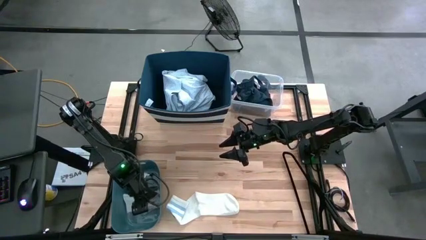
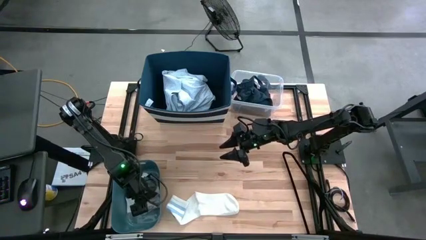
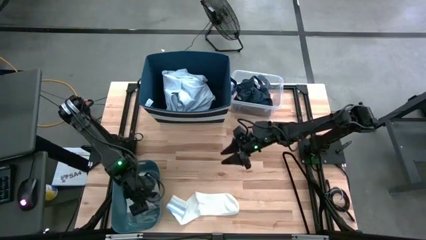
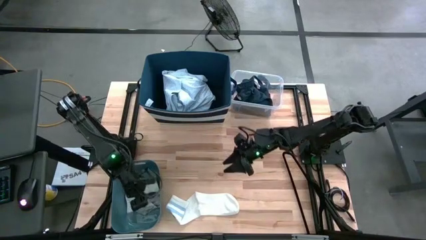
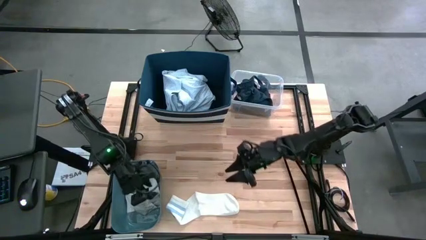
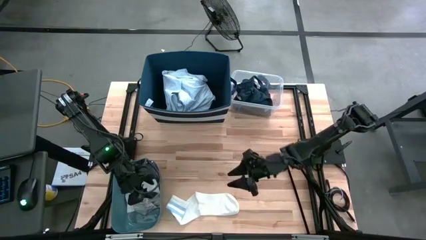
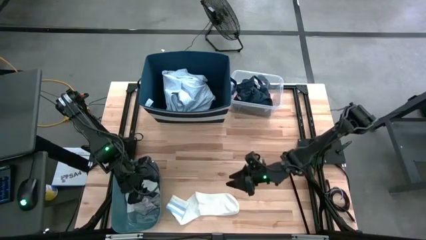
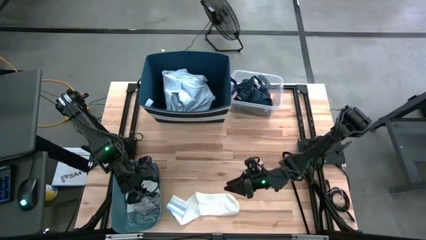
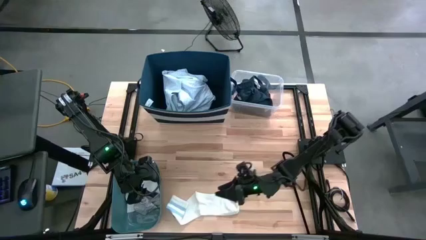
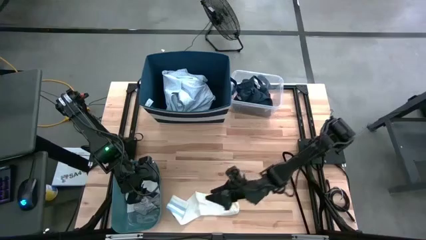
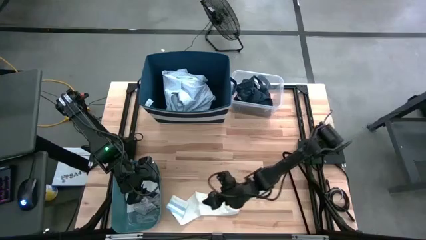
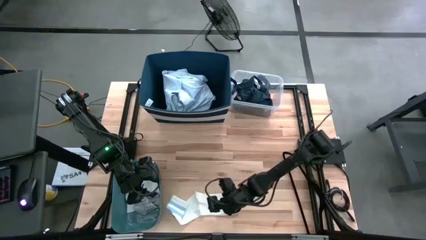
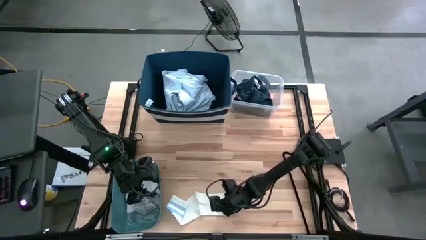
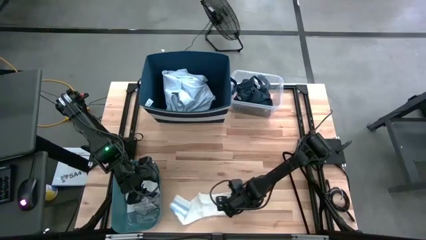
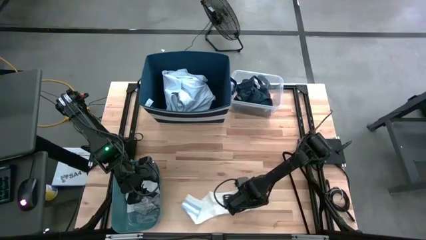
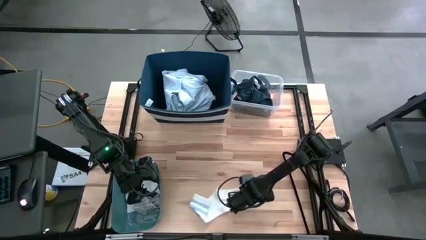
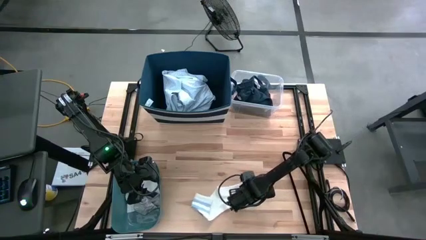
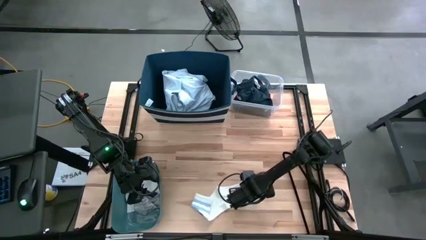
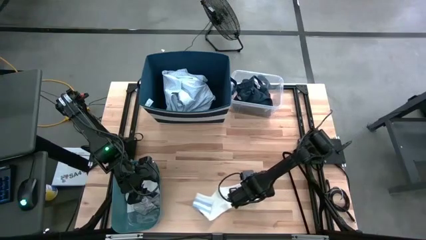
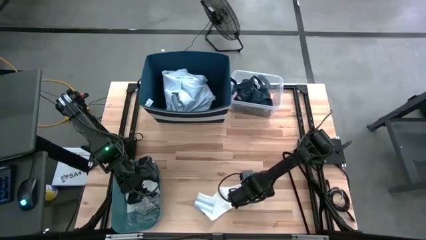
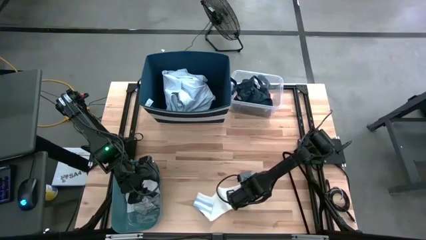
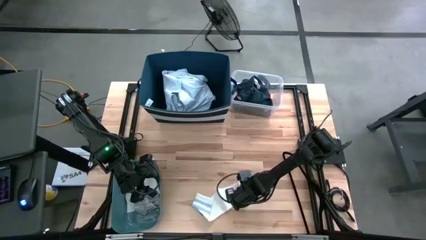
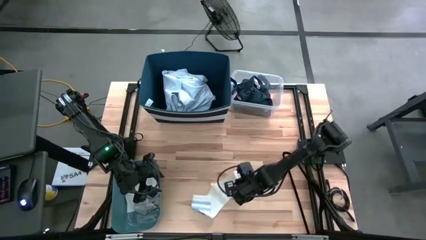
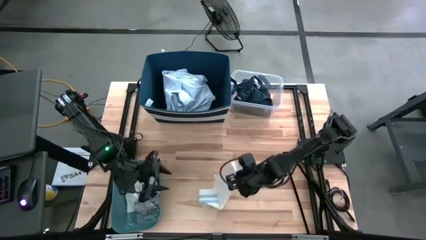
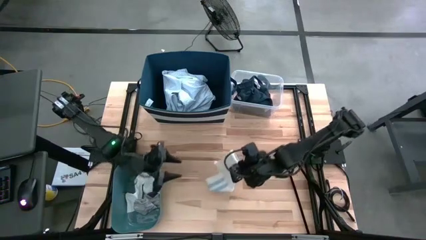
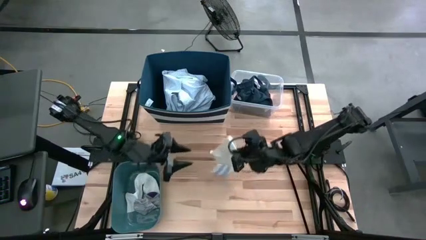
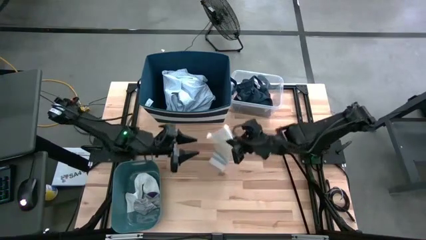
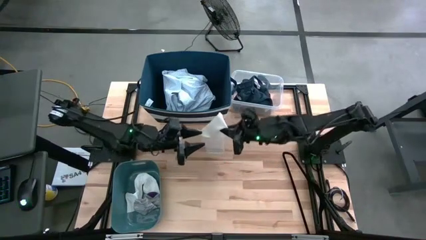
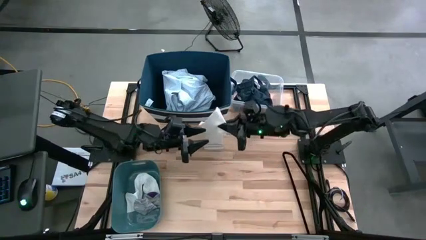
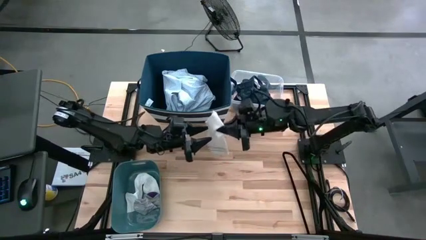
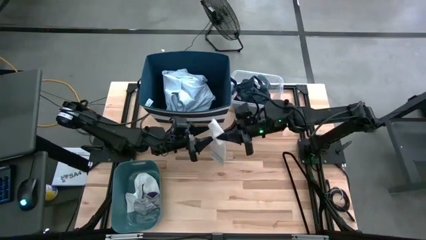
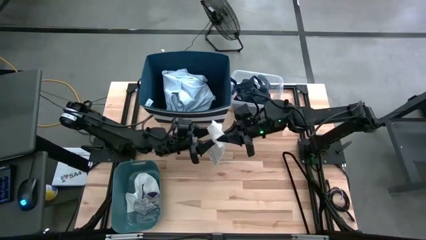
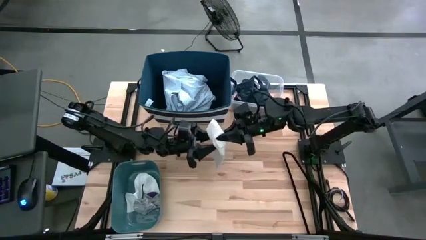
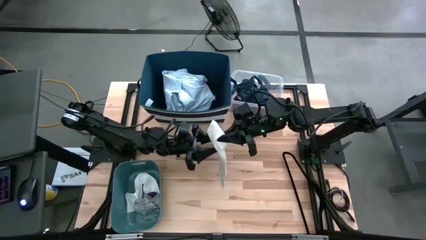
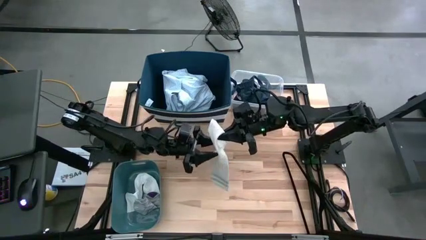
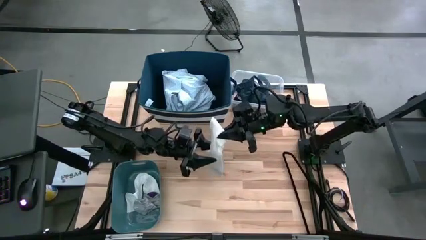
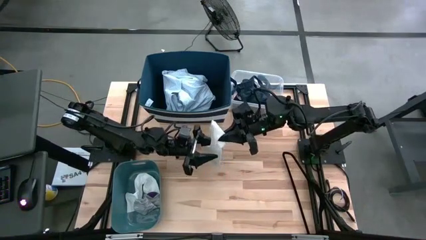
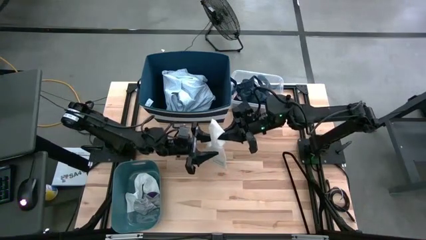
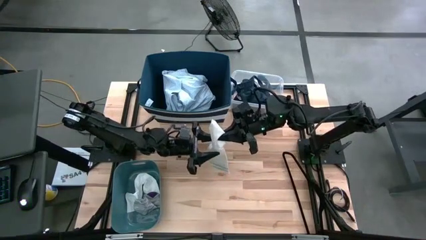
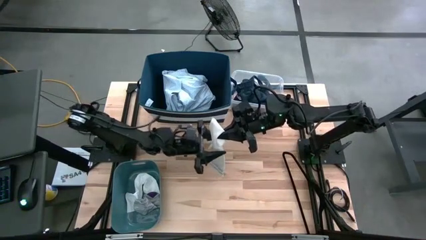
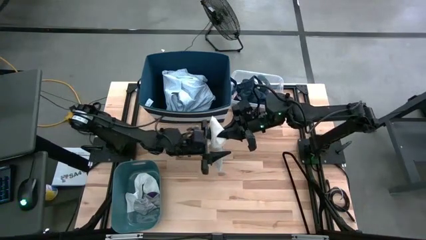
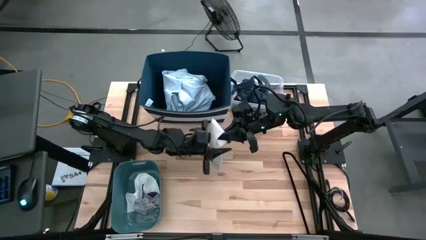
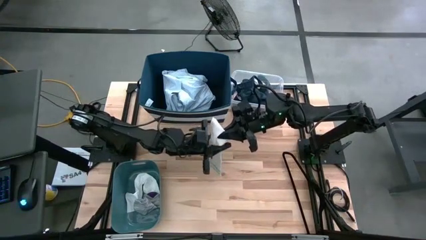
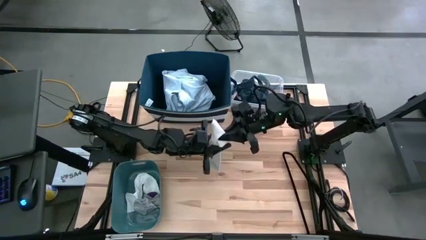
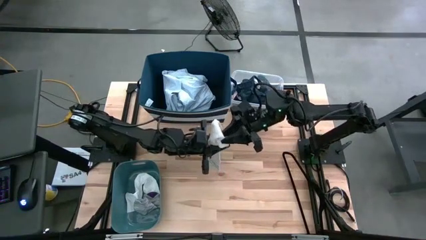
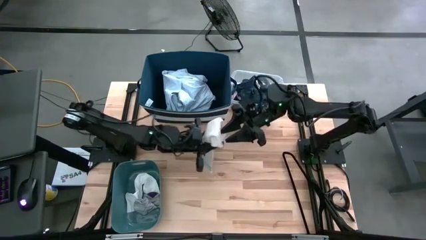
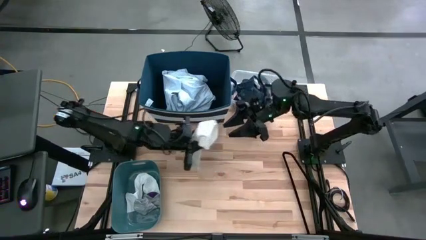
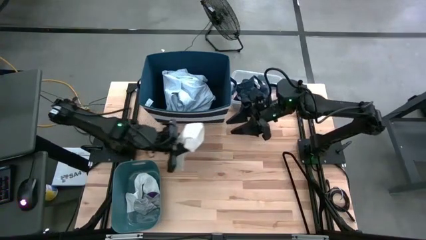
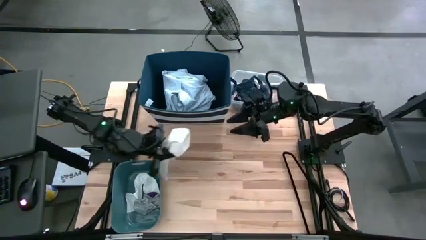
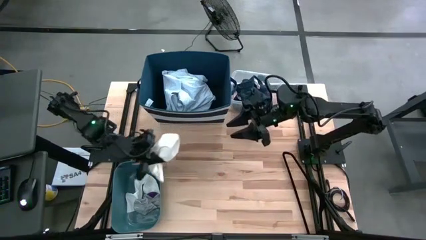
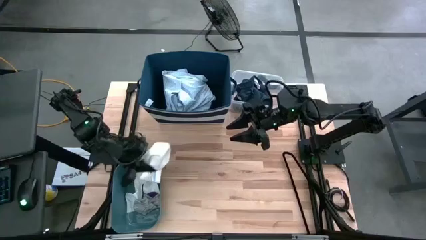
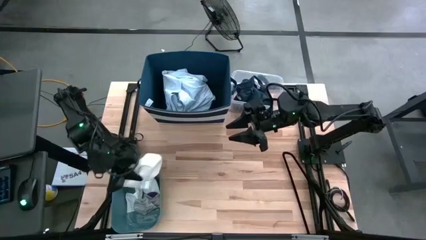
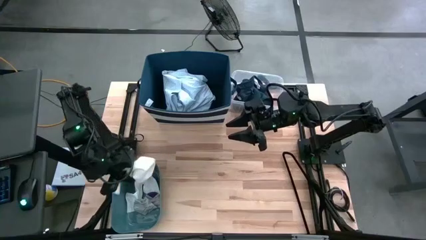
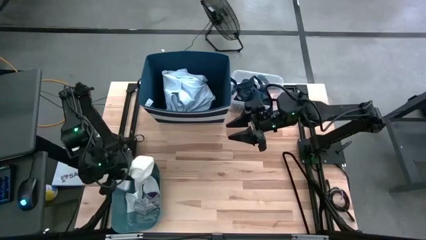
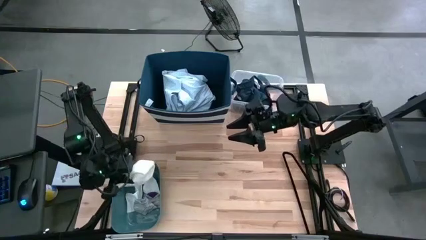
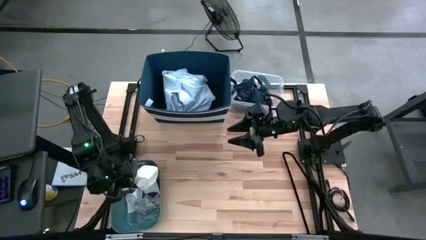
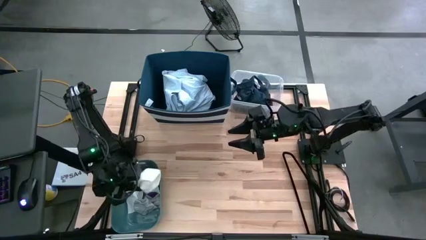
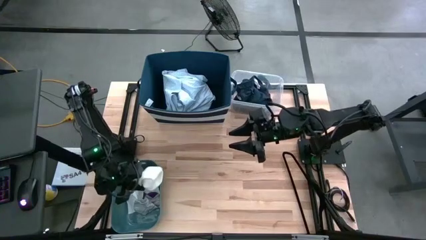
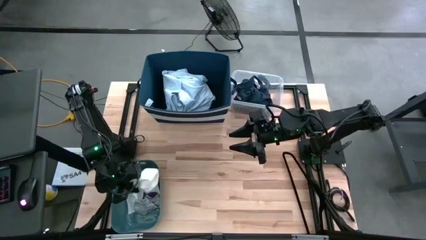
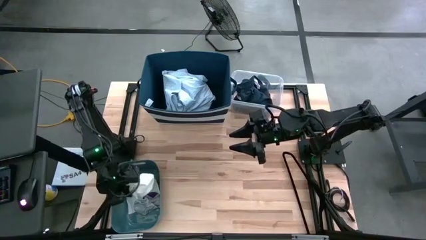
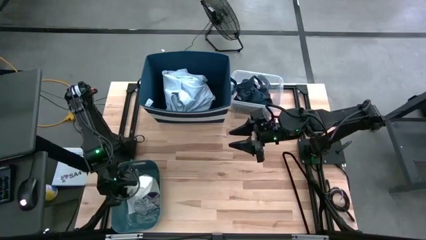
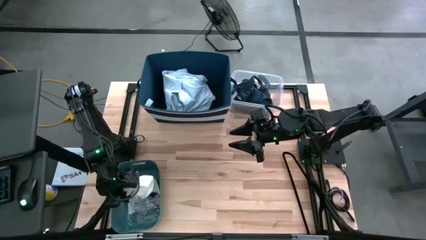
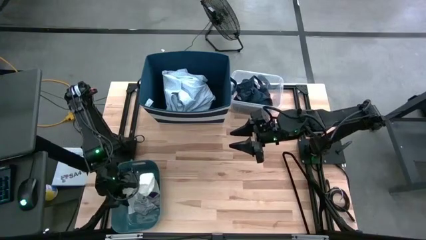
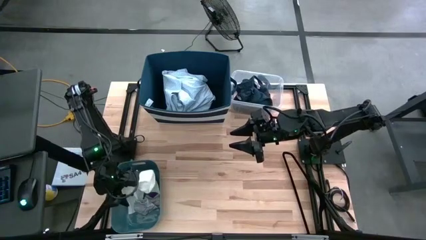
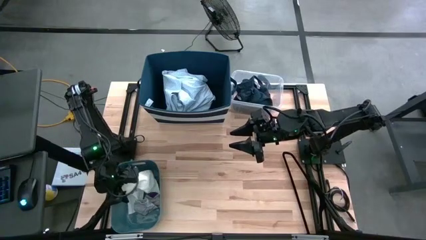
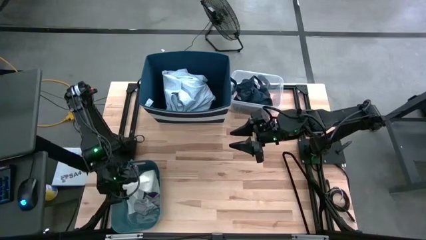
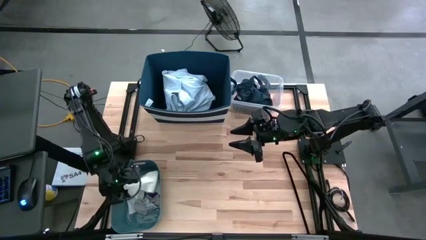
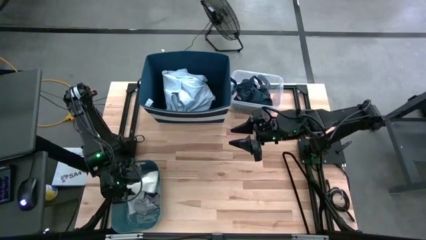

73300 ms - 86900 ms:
Task: Pick & Place Cloths
Put the white sock into the light blue bin

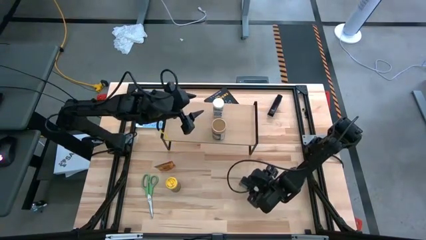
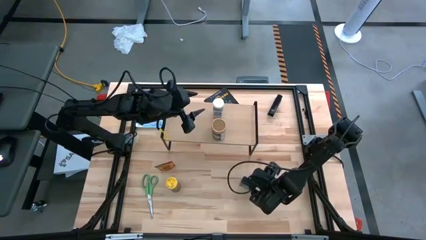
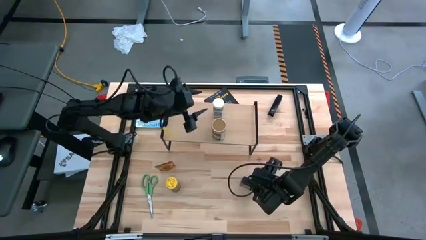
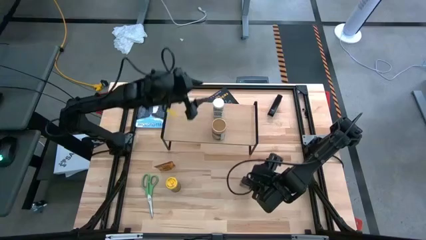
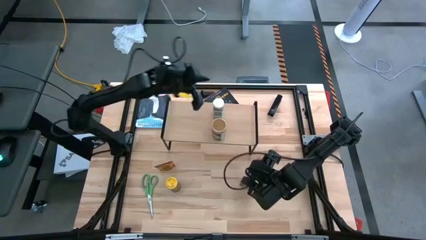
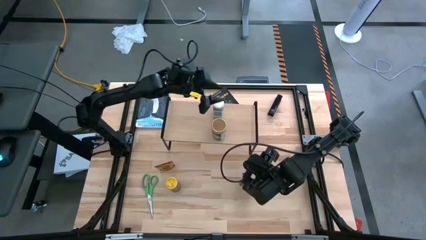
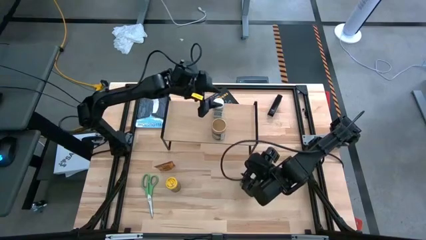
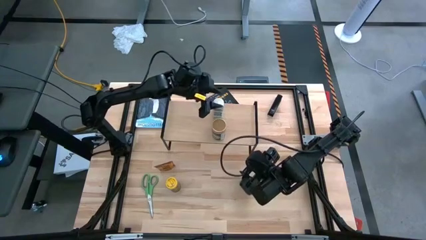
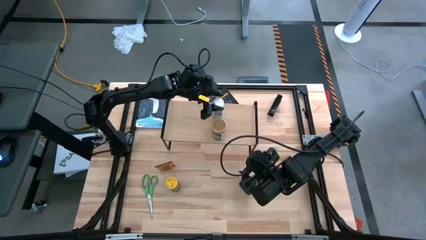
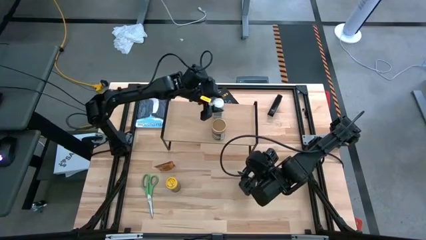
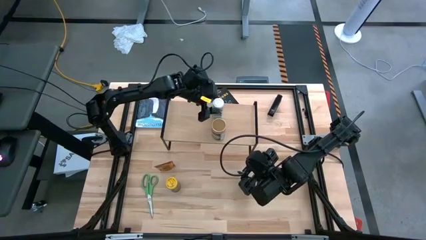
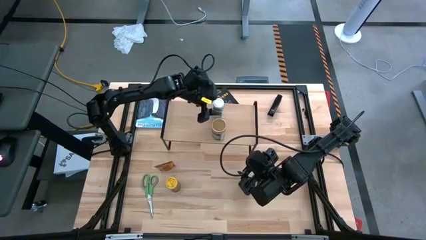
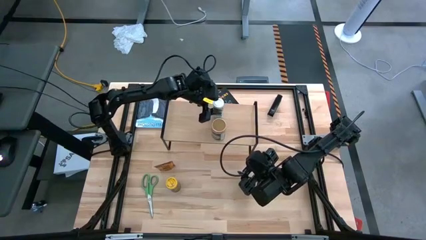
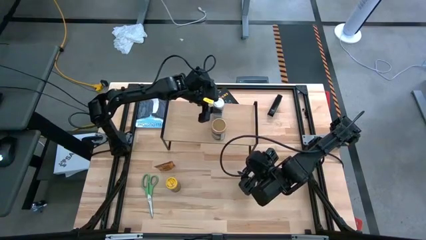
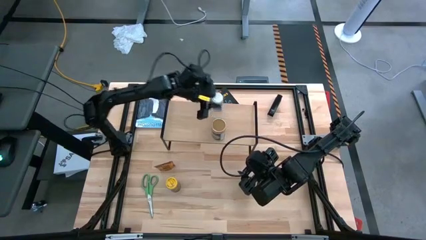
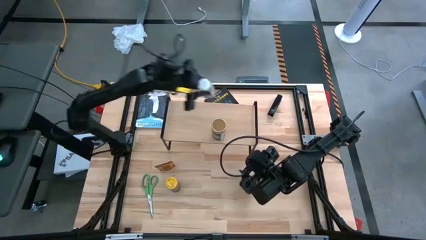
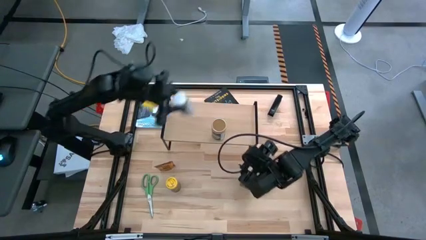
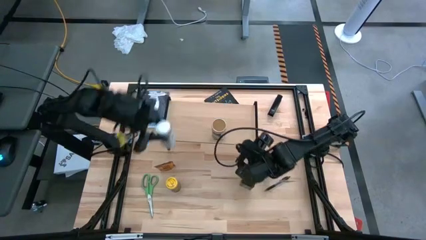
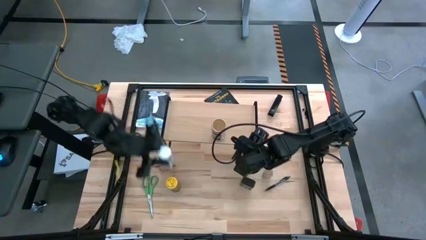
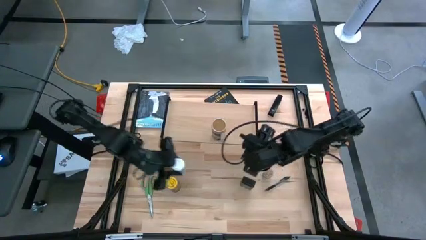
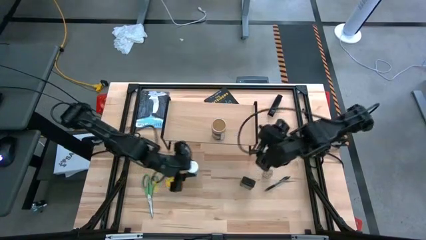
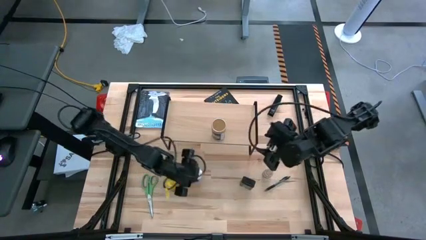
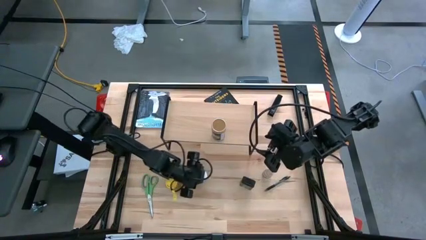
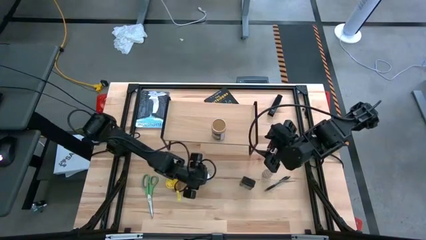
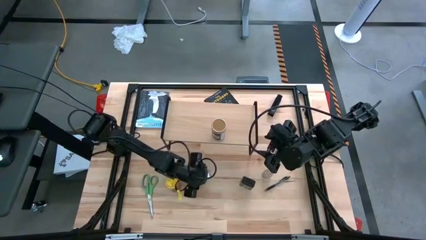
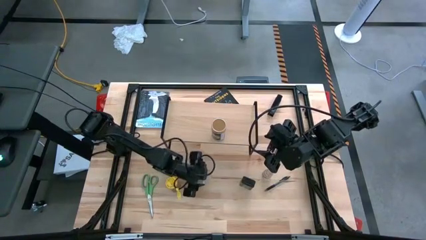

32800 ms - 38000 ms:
Task: Shelf spices
Remove the white seasoning bottle from the shelf
